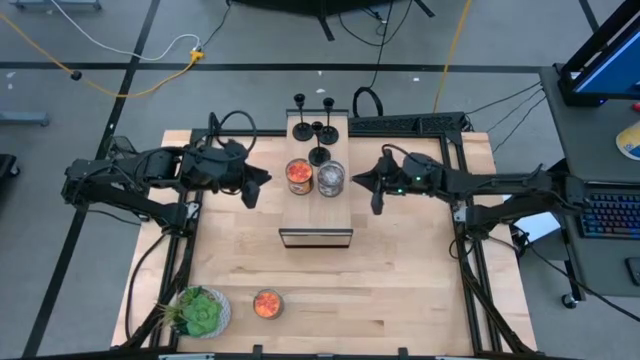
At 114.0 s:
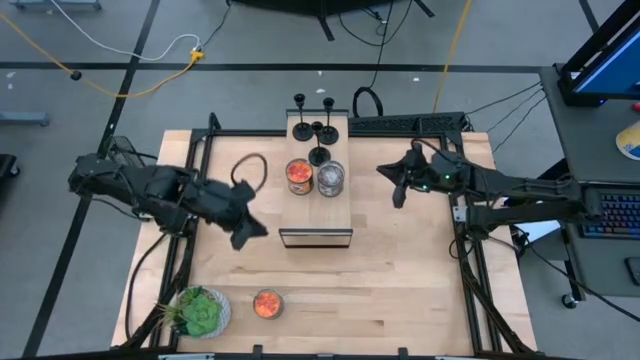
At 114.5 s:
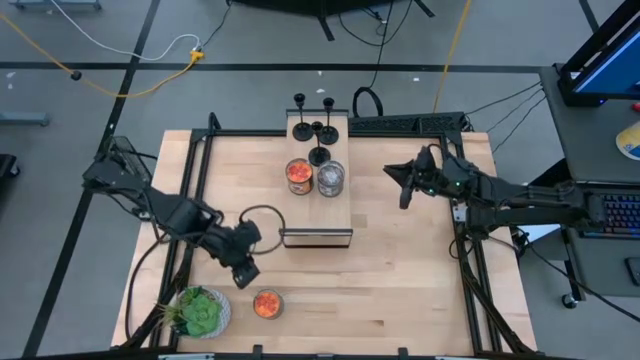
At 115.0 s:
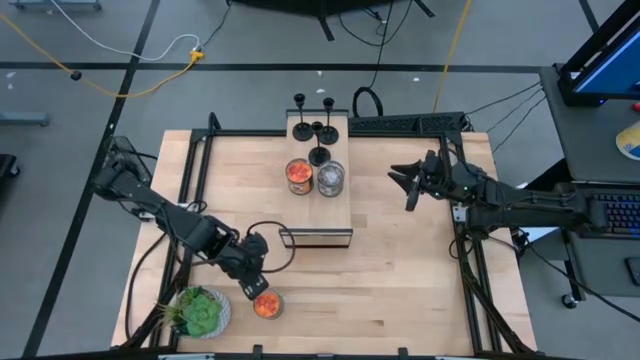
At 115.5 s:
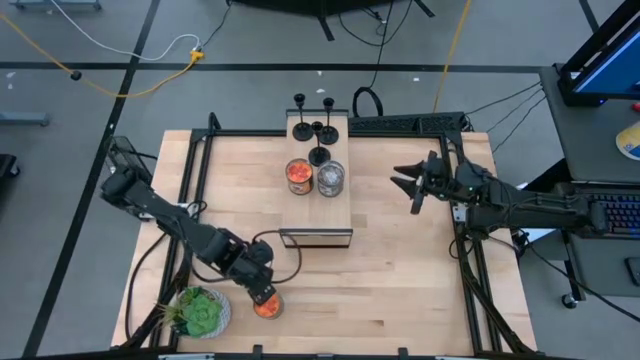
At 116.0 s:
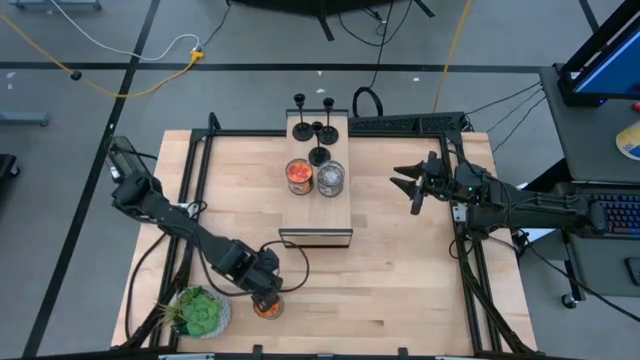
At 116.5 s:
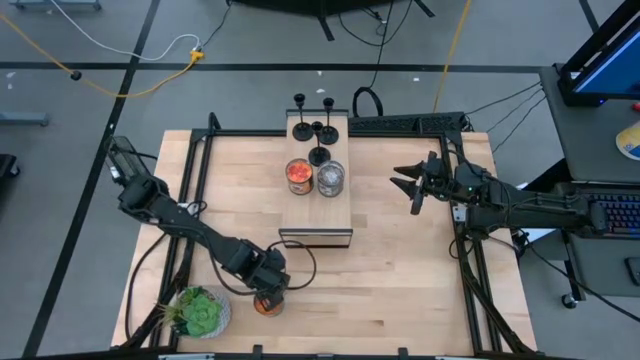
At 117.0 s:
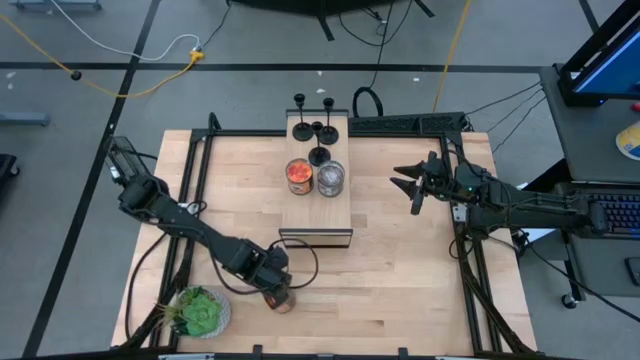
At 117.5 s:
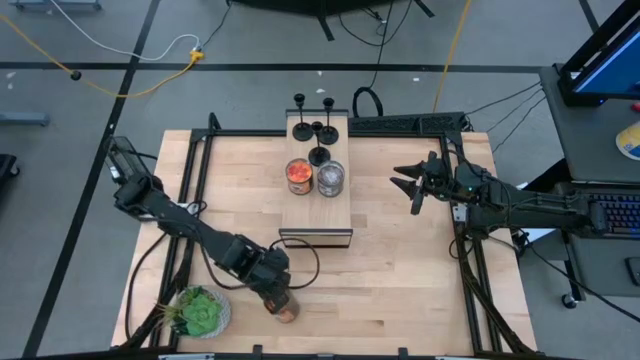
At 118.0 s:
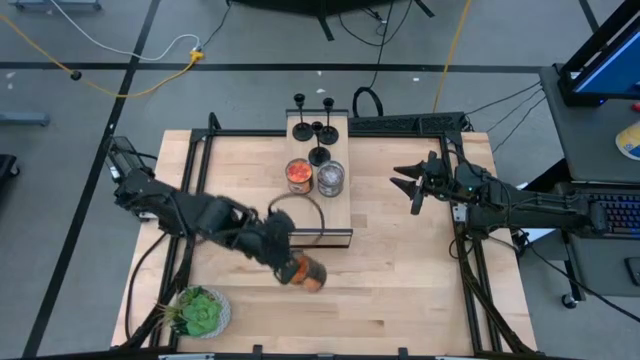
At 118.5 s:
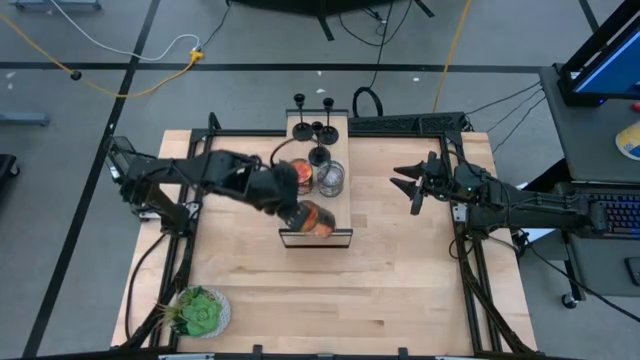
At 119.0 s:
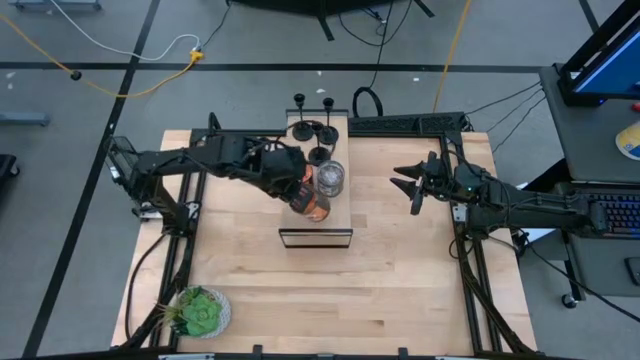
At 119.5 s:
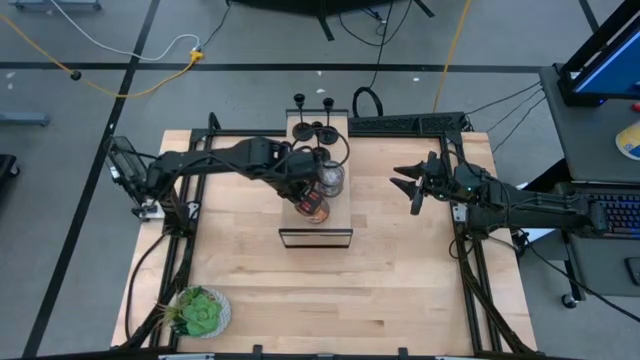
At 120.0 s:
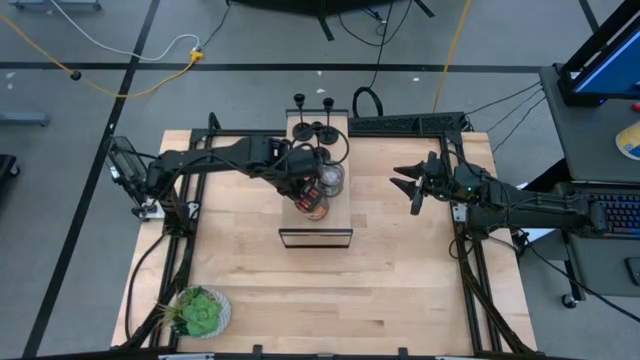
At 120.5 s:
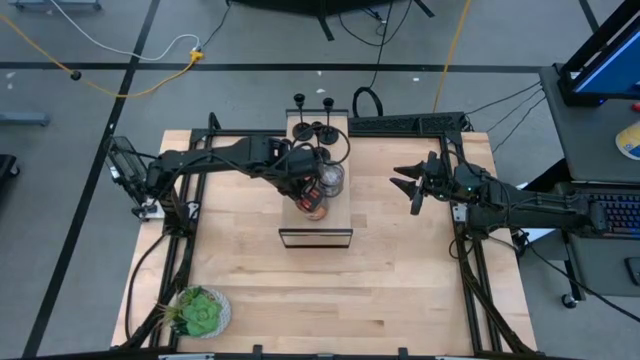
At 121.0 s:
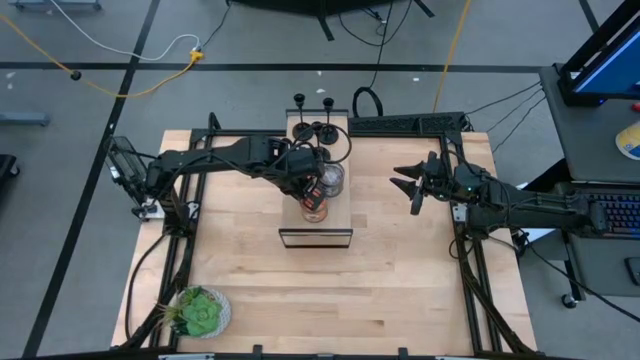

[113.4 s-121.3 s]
Task: Pick & Place candle stick holders
Put the orange scented candle on the shelf

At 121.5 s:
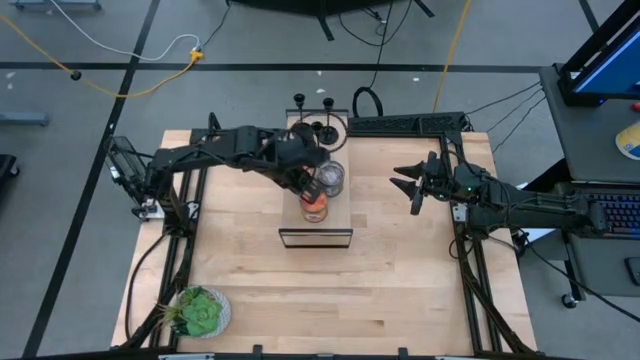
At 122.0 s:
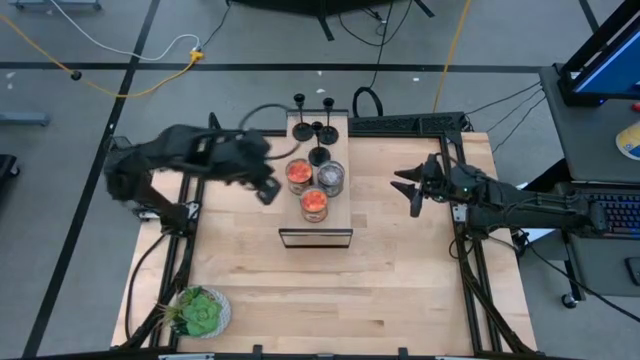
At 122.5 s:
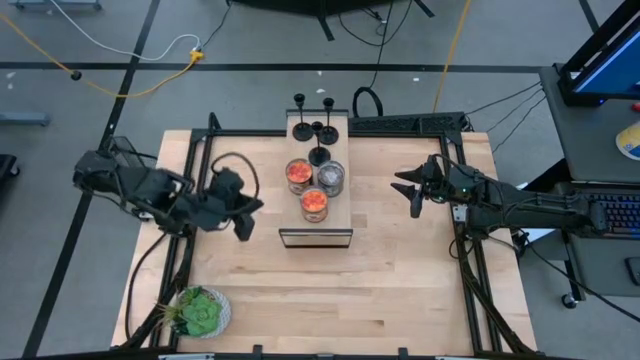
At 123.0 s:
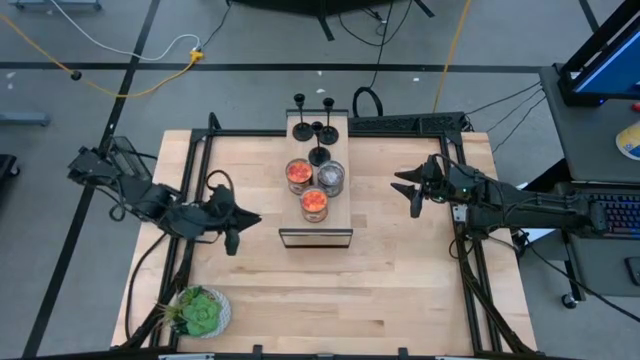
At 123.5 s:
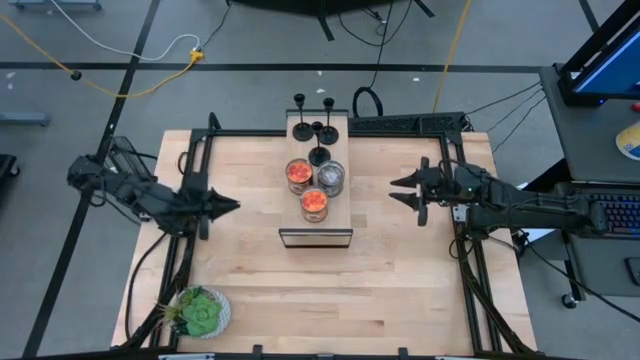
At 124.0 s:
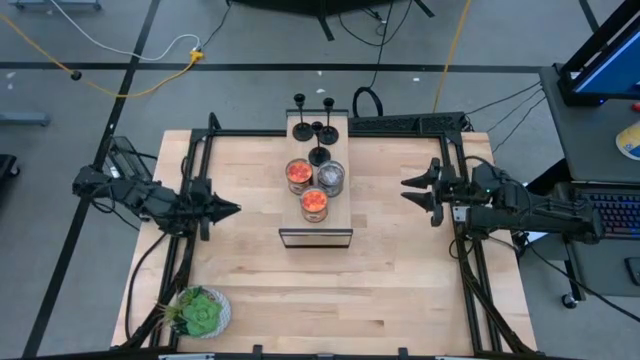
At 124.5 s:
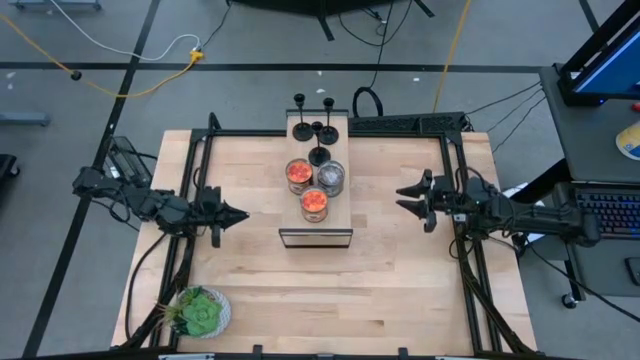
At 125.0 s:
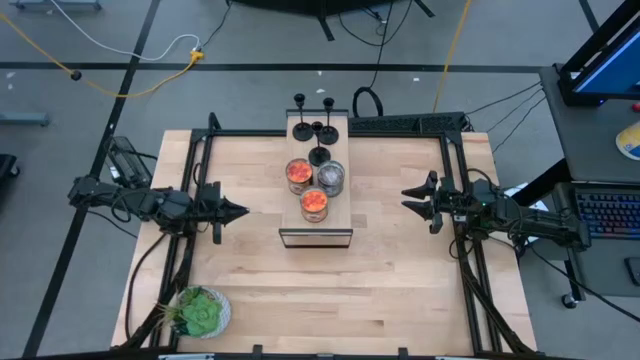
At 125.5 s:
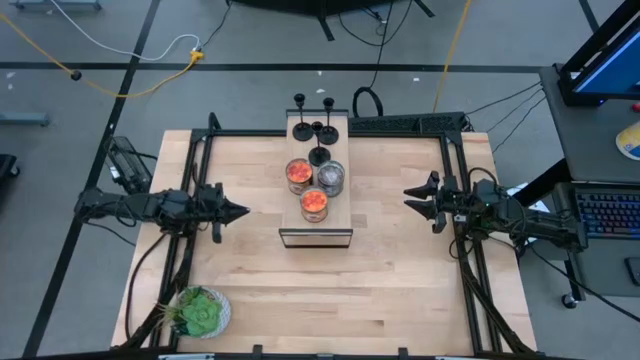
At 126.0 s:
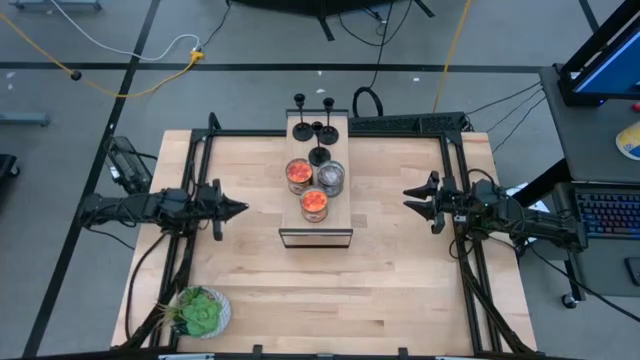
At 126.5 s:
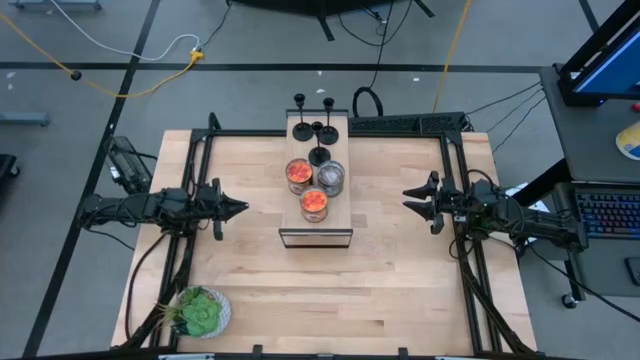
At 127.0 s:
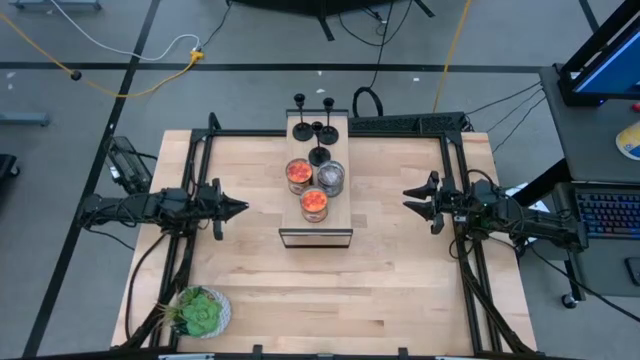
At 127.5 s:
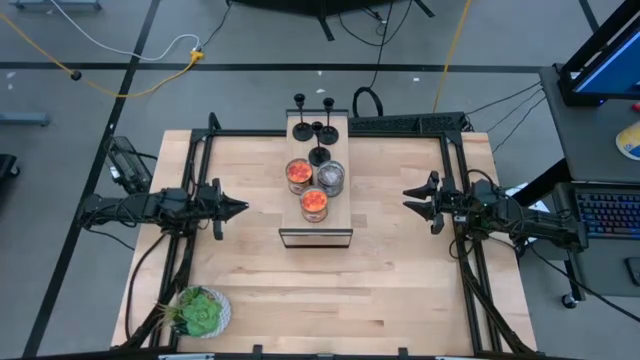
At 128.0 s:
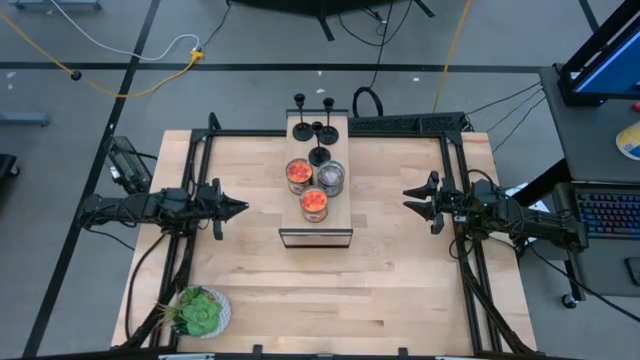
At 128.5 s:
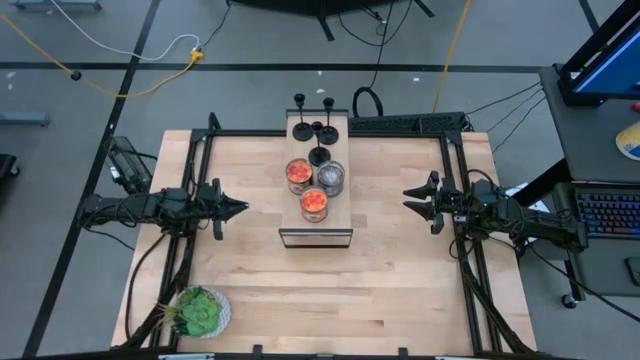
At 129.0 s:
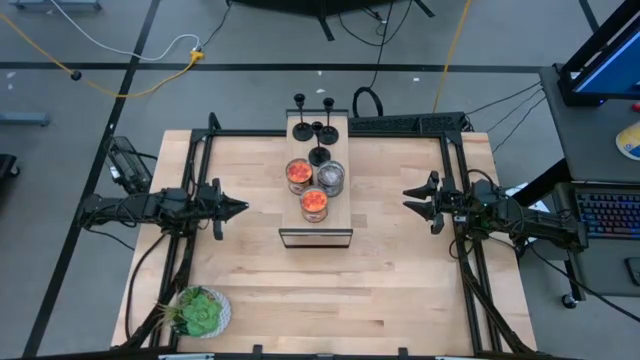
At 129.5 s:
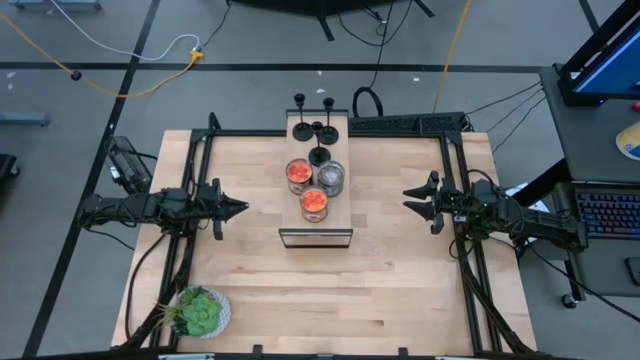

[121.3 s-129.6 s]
Return to Home Position

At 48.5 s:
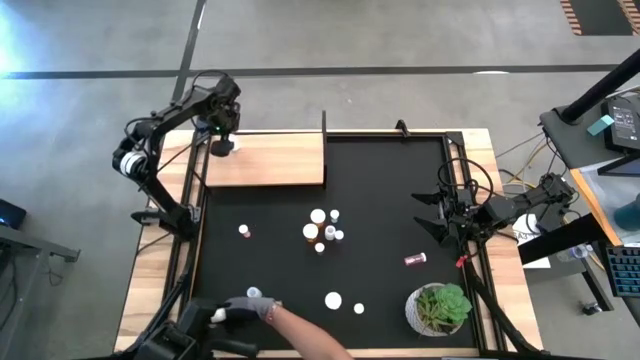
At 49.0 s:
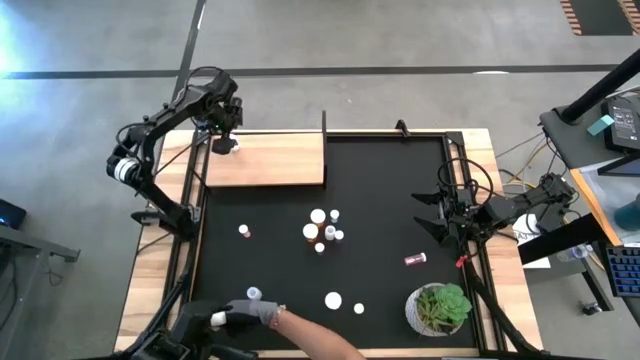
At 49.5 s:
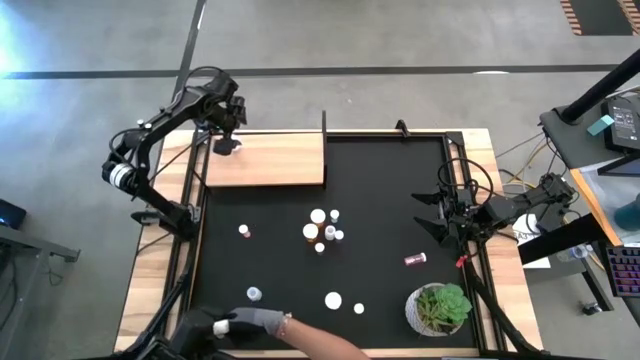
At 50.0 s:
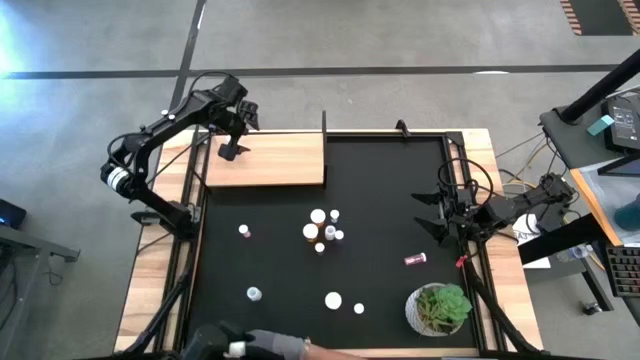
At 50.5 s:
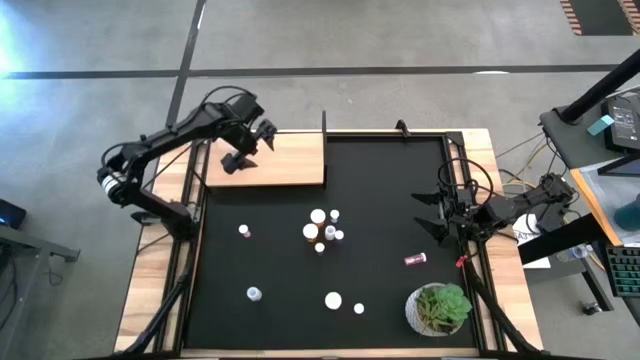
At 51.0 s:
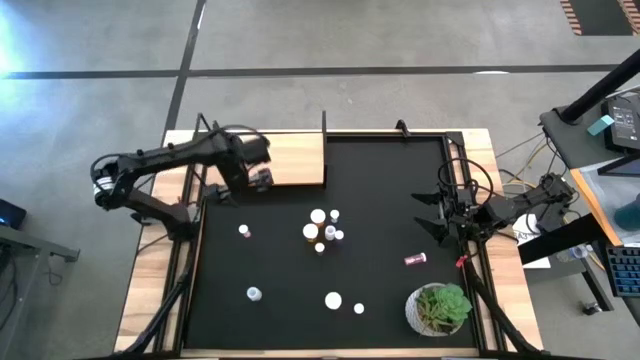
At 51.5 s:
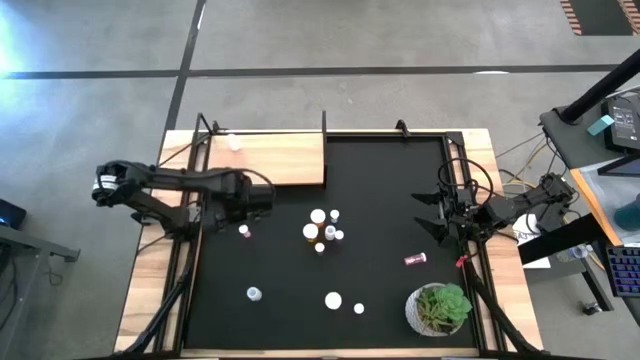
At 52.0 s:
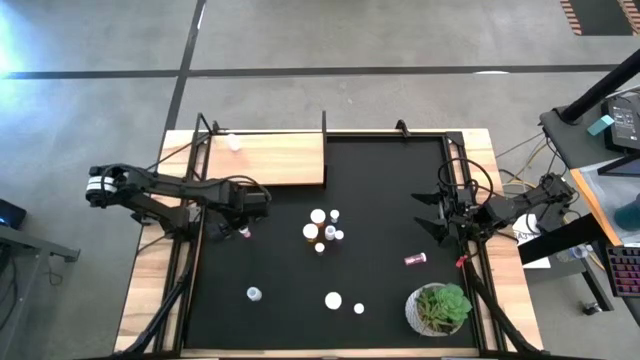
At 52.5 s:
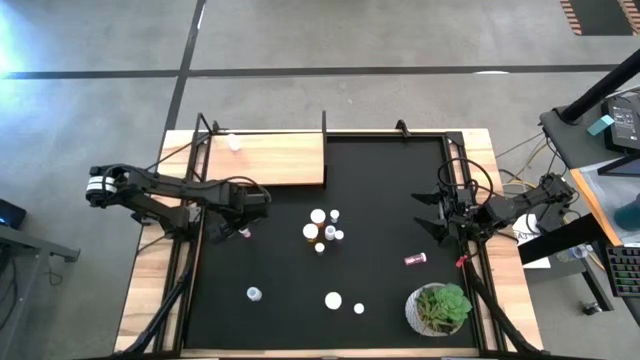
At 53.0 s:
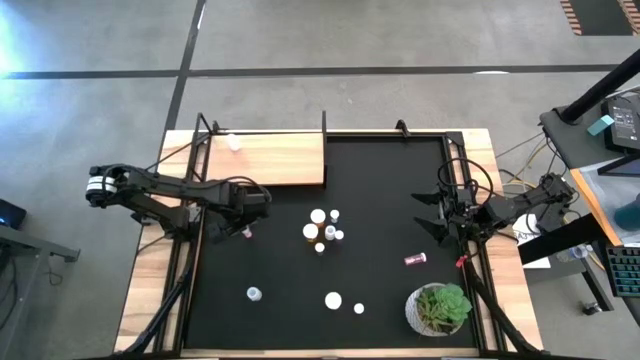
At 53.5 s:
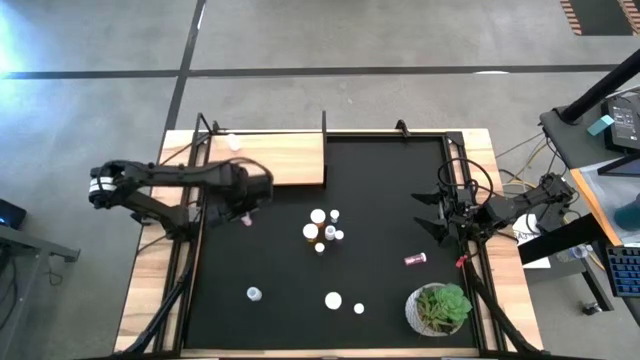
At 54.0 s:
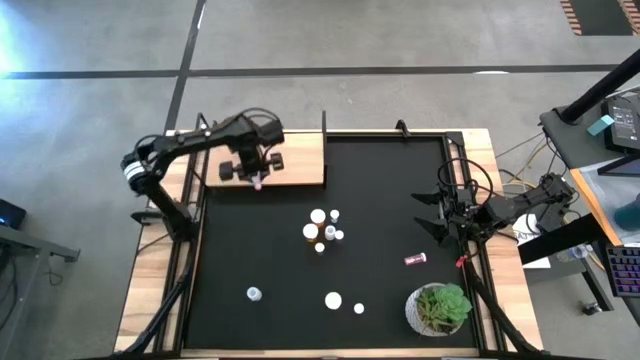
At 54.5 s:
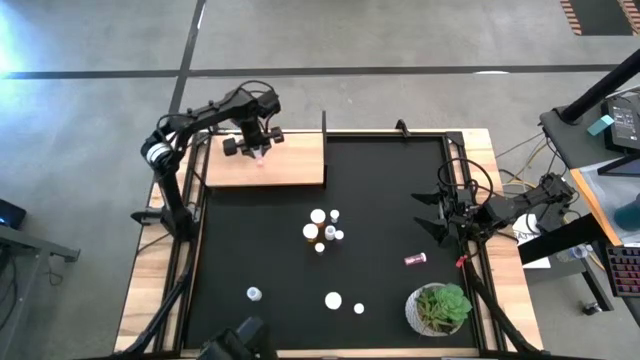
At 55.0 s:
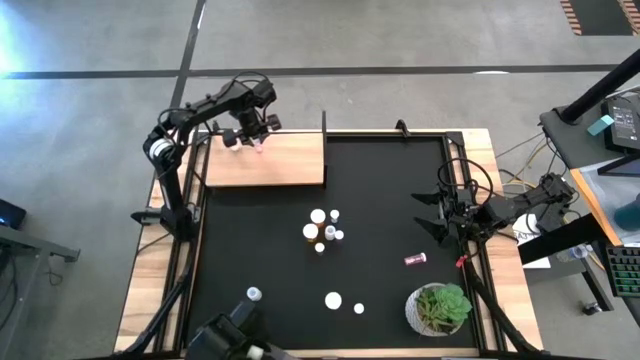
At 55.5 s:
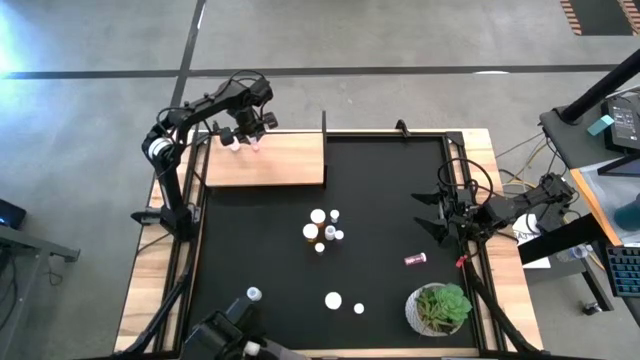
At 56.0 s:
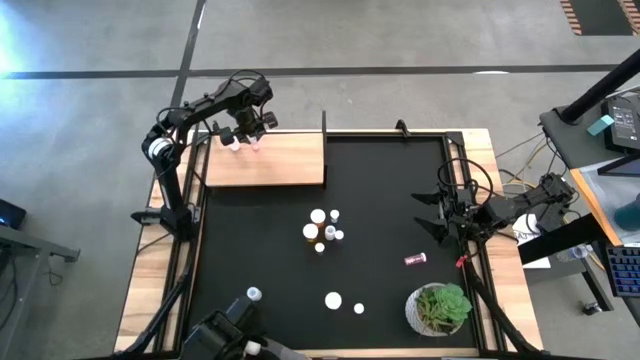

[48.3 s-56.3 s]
Task: Pick and place medicine bottles onto shelf by color
Put the top left pink pill bottle on the shelf
